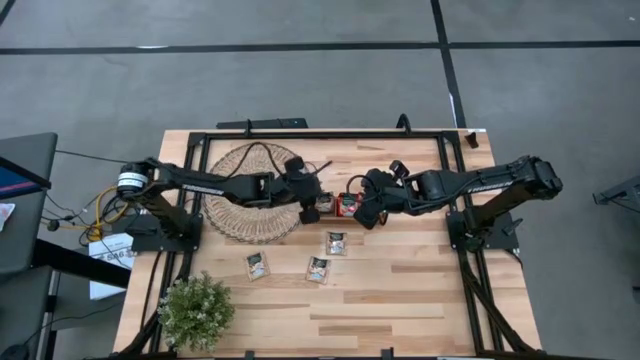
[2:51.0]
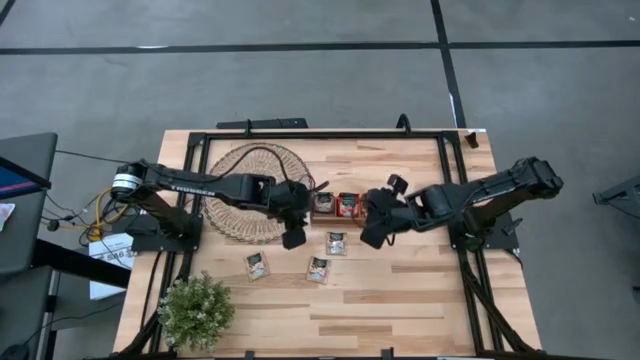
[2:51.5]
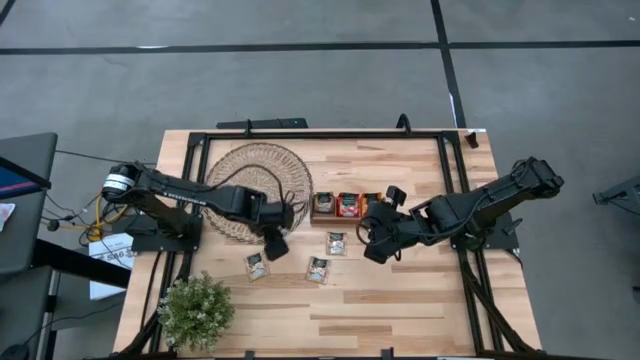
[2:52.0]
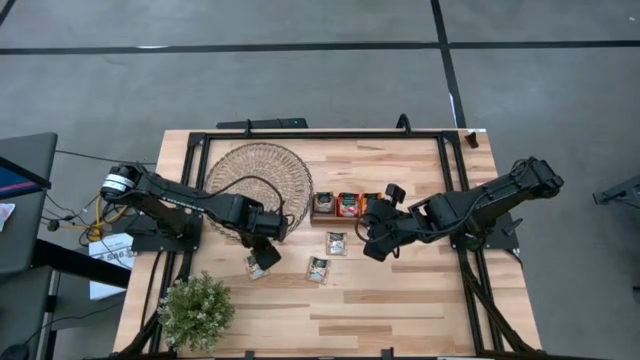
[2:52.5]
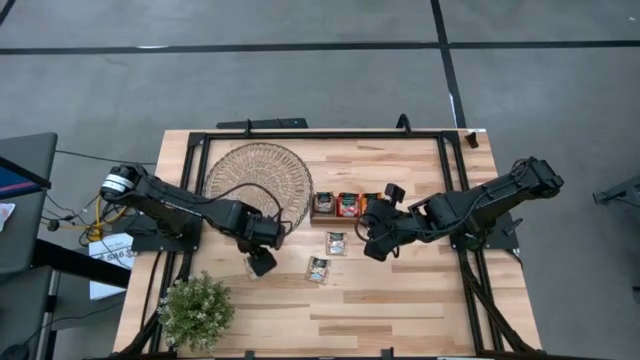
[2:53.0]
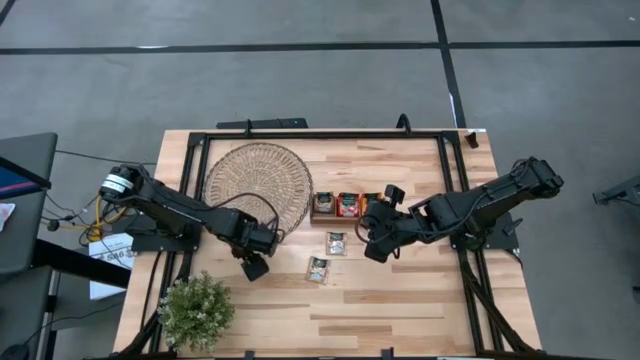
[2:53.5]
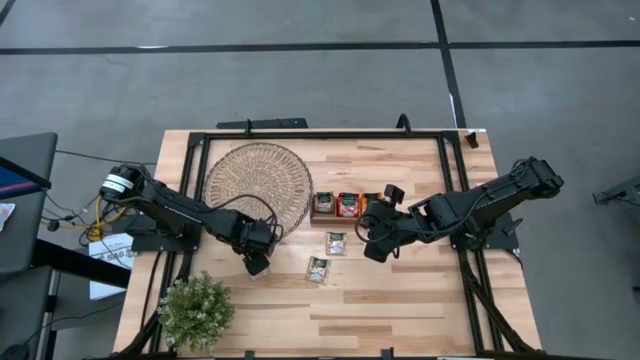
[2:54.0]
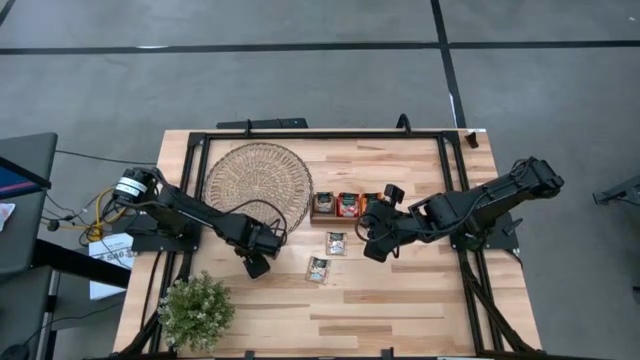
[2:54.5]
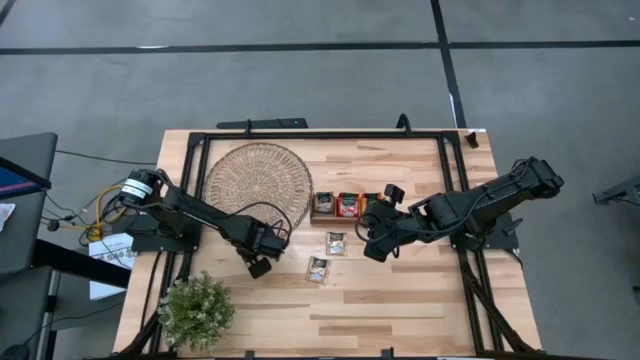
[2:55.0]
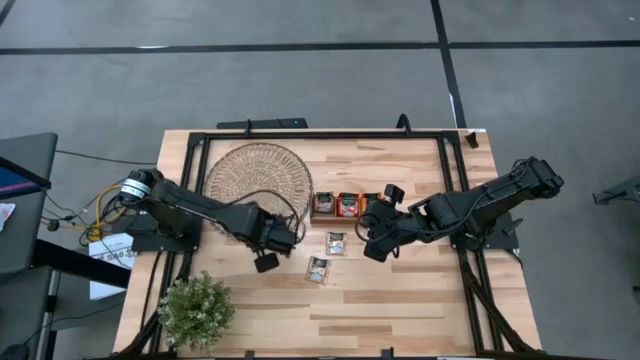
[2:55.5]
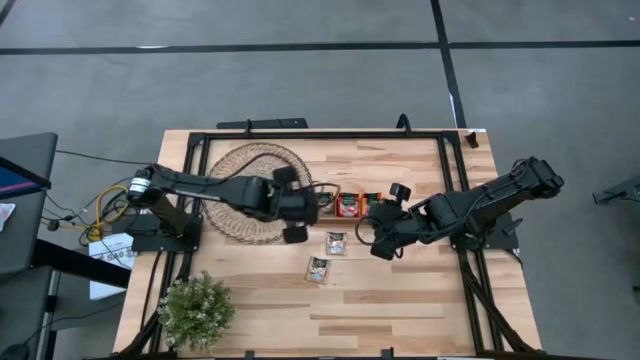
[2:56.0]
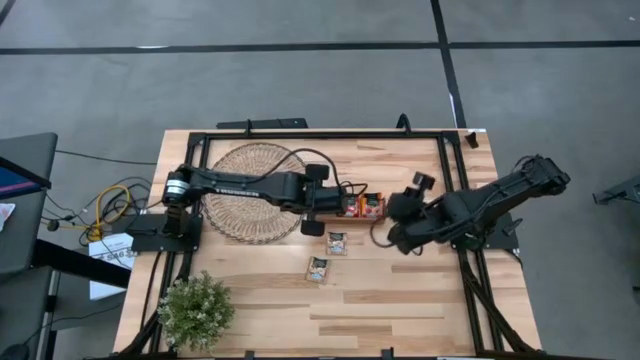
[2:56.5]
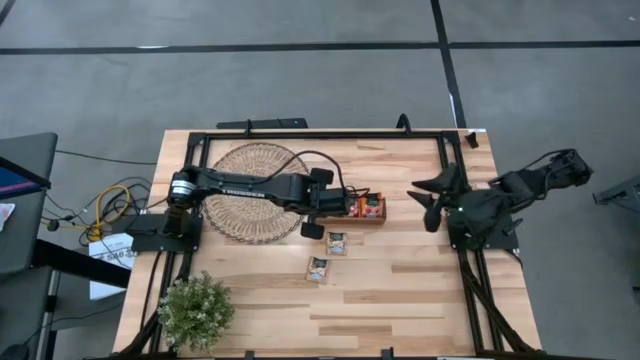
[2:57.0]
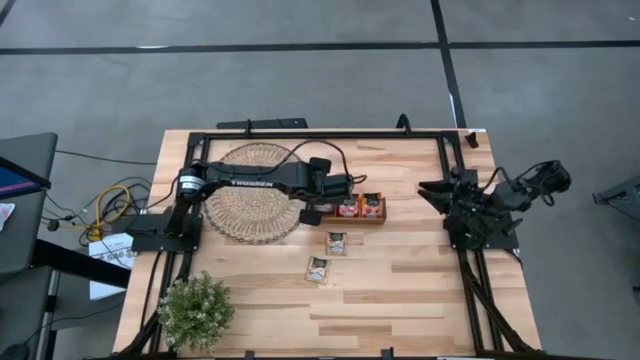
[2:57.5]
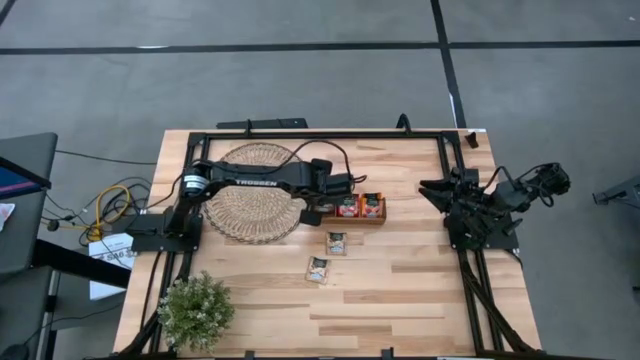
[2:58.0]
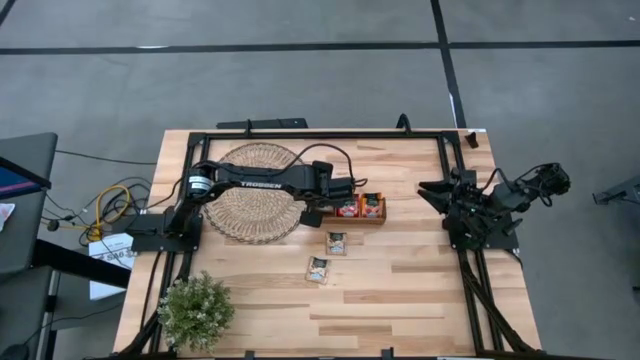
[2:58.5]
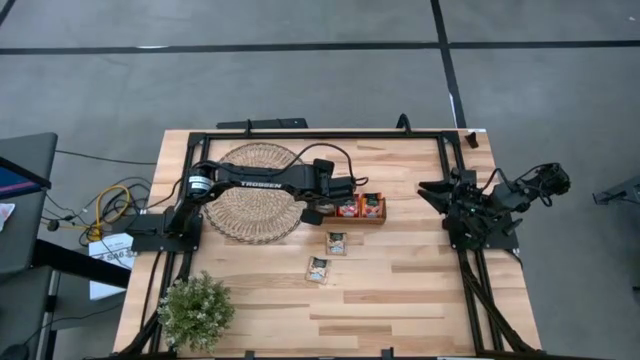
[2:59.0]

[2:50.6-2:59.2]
Task: Pick & Place Tea
Put the brown tea bag into the left section of the wooden organizer

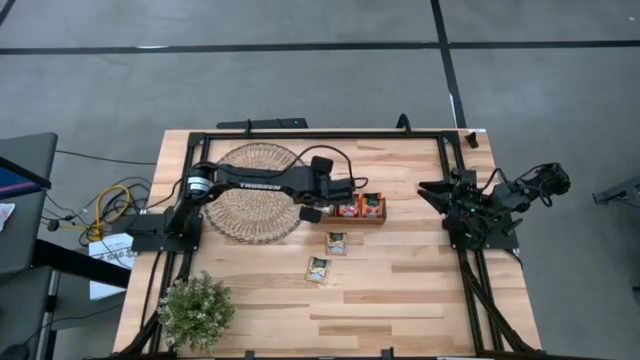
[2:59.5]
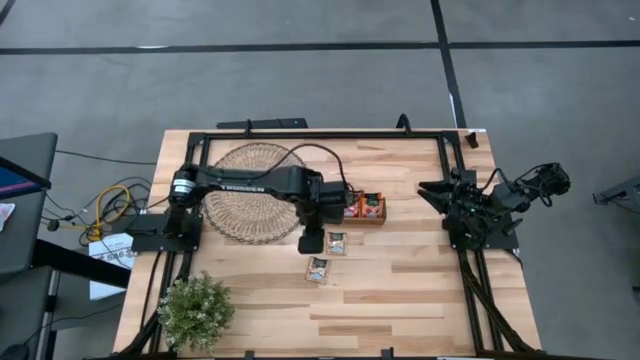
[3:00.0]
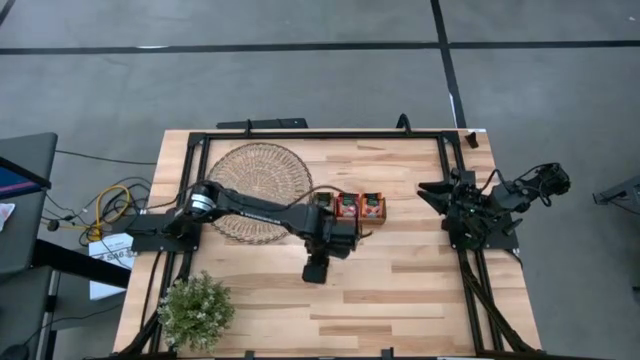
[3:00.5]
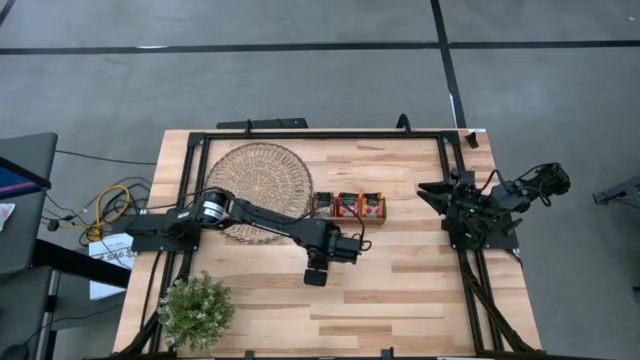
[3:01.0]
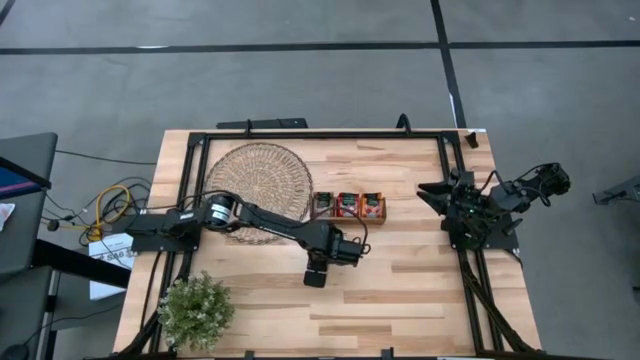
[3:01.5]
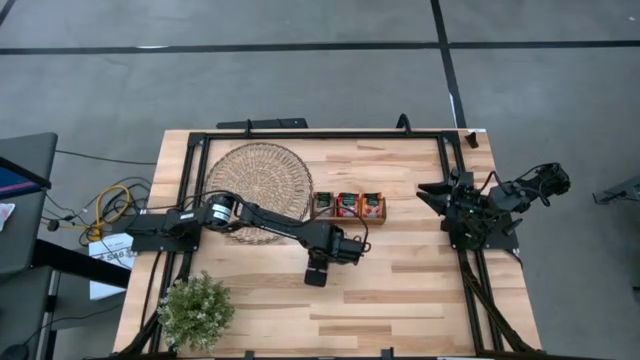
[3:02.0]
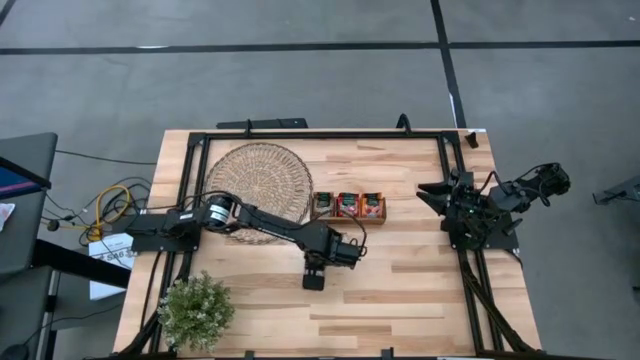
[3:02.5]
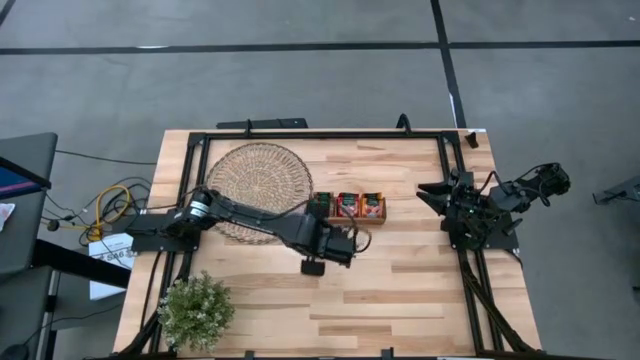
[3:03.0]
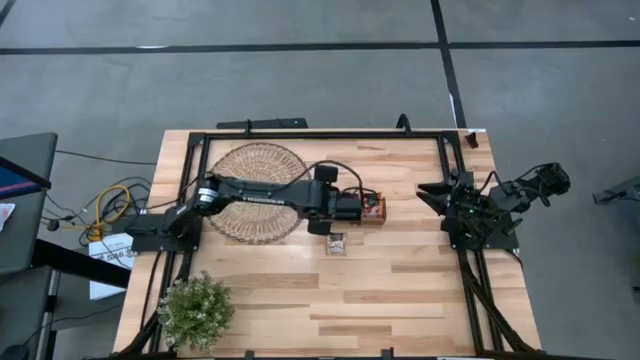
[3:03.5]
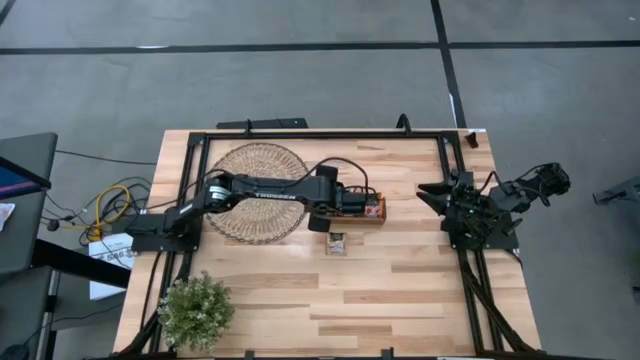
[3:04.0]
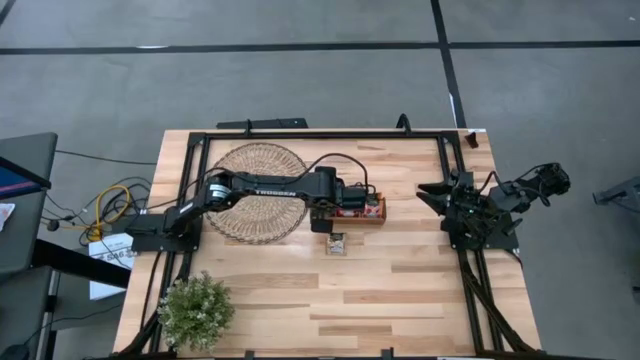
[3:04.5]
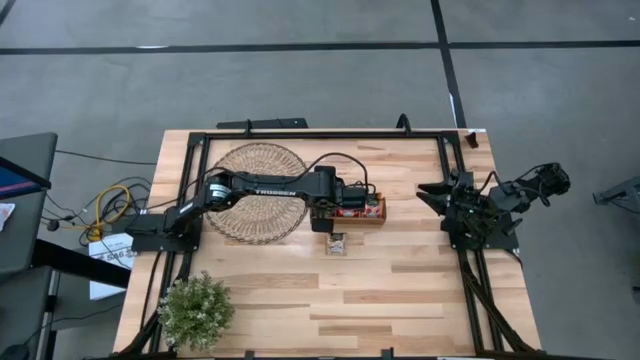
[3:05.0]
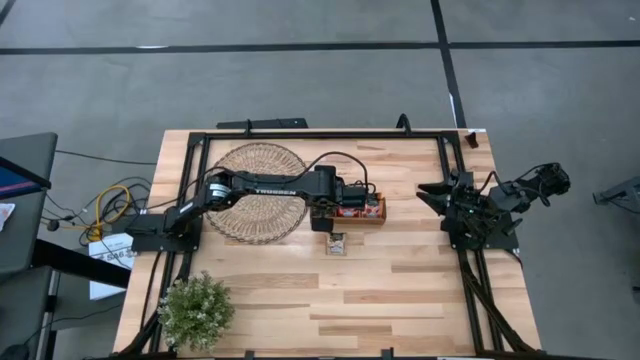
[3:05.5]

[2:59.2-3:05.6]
Put the brown tea bag into the left section of the wooden organizer

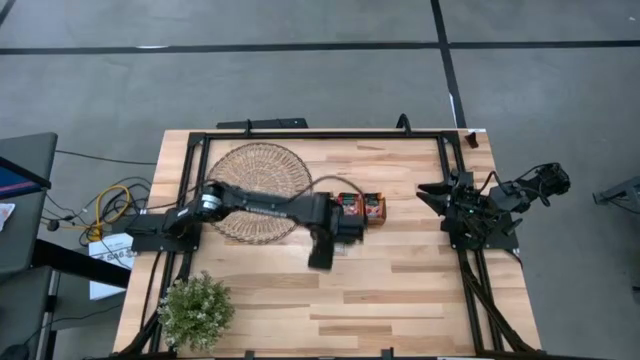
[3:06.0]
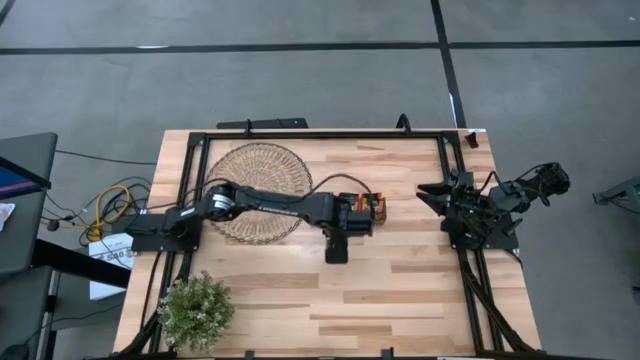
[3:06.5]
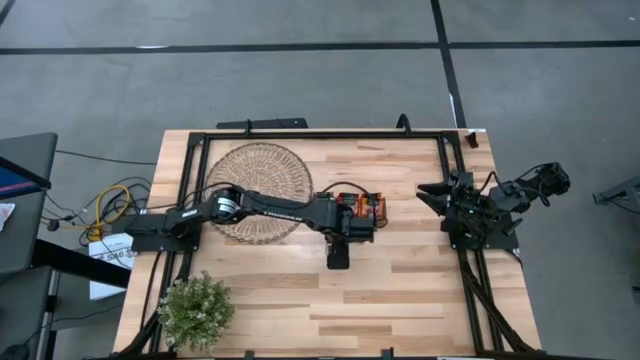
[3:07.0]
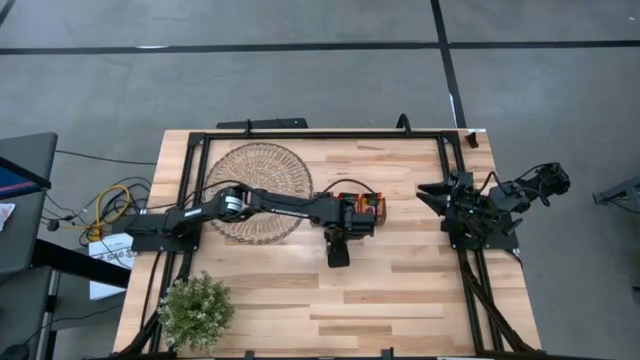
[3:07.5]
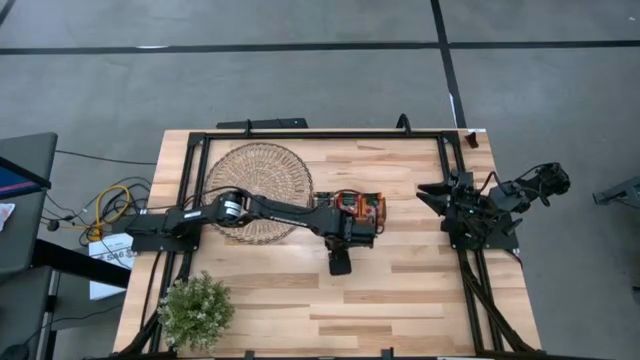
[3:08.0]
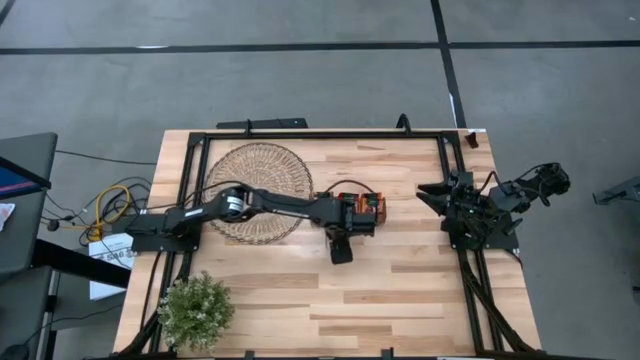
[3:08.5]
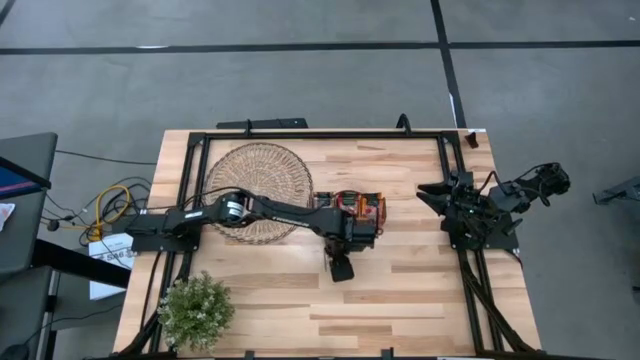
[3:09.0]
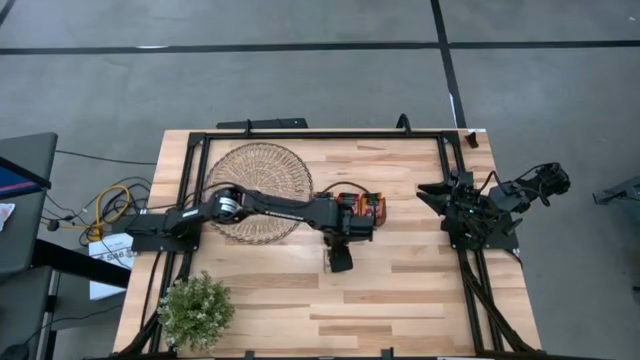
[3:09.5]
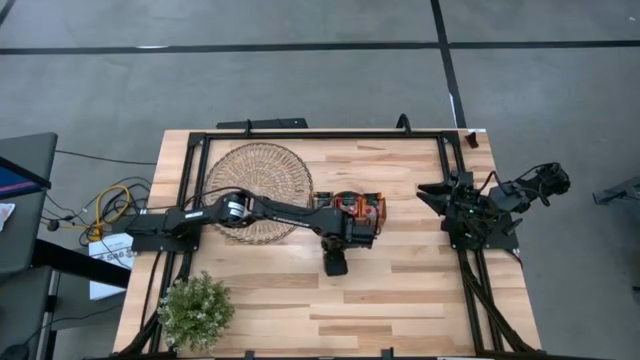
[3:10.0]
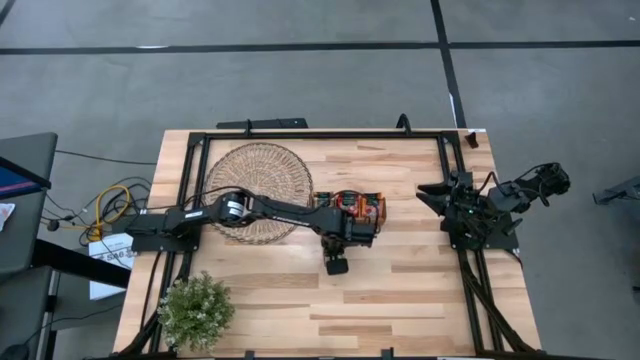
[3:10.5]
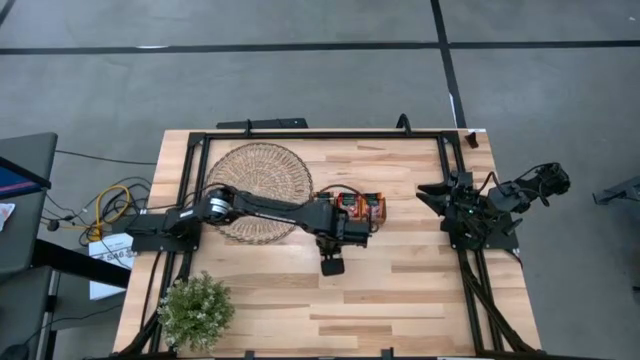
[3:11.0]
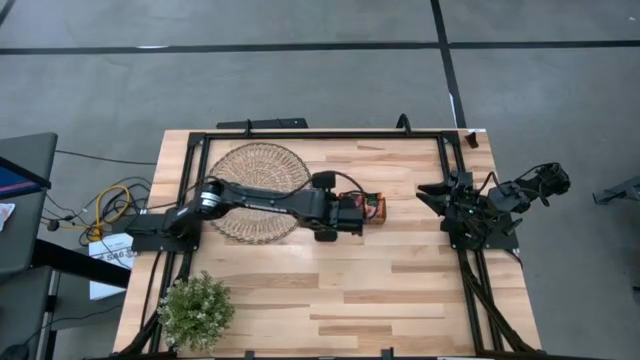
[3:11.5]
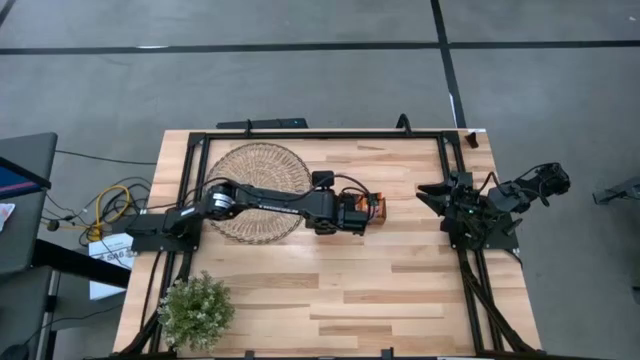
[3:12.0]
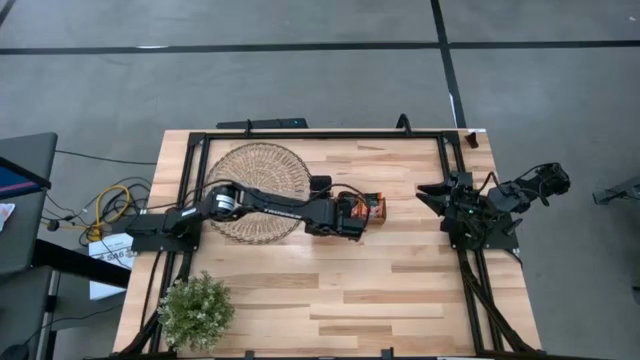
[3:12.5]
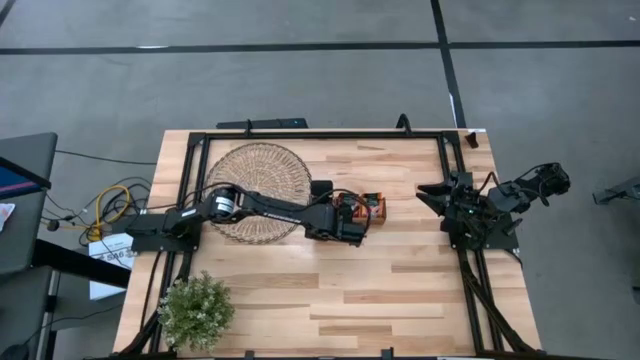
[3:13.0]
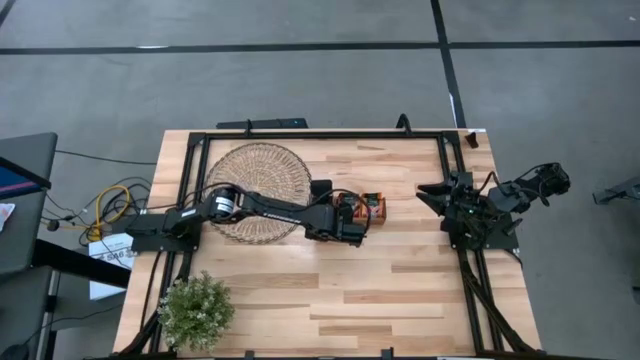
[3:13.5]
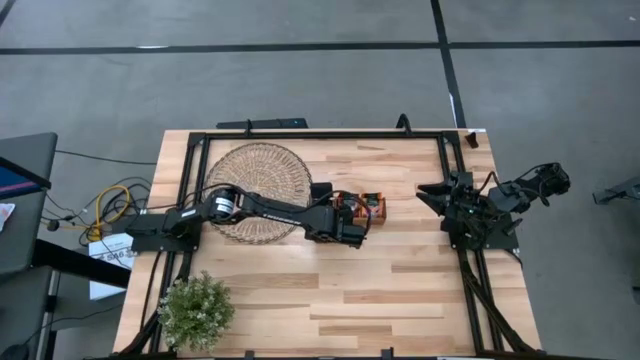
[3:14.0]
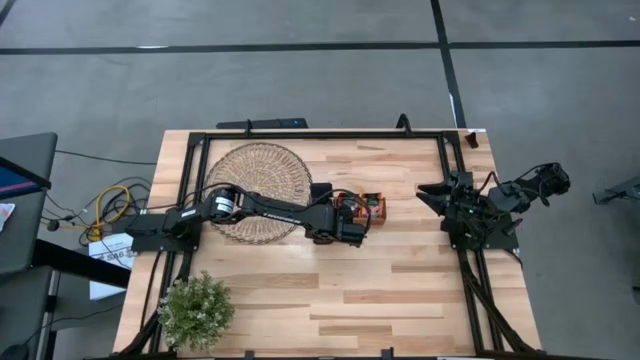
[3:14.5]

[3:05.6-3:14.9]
Put the brown tea bag into the left section of the wooden organizer
